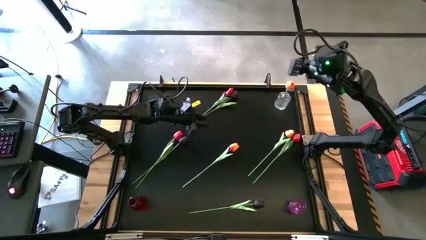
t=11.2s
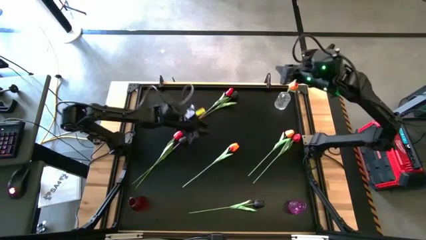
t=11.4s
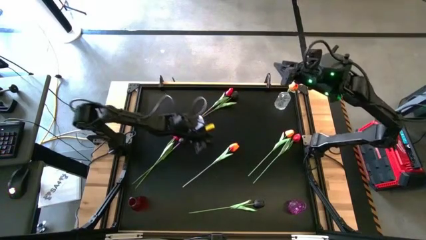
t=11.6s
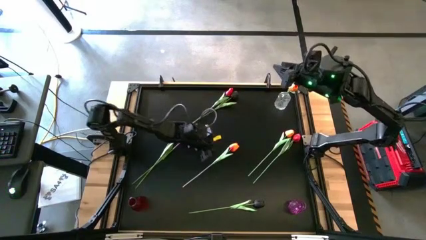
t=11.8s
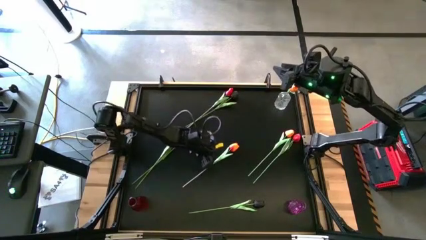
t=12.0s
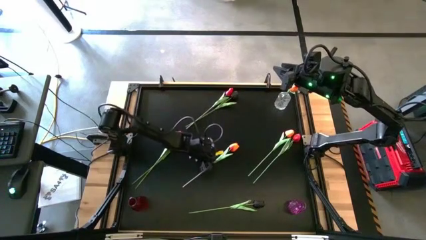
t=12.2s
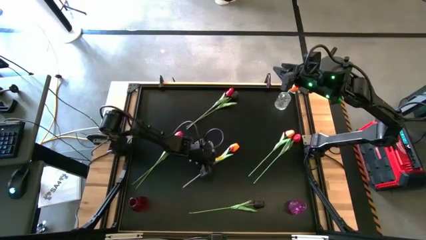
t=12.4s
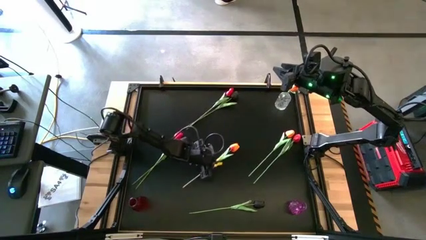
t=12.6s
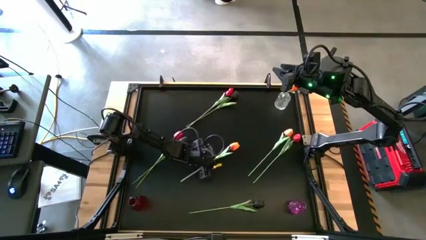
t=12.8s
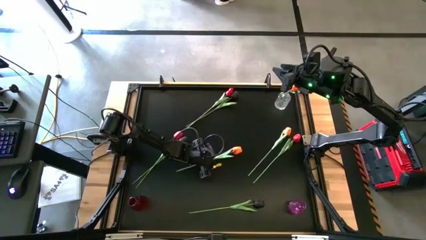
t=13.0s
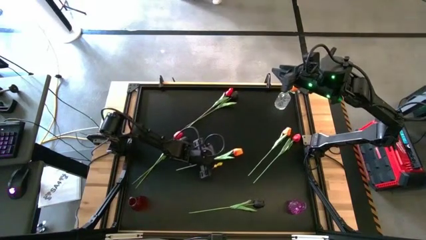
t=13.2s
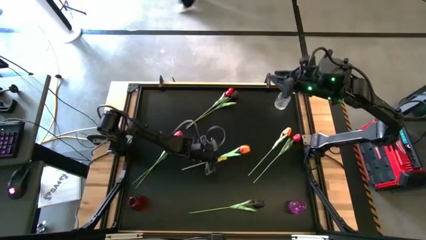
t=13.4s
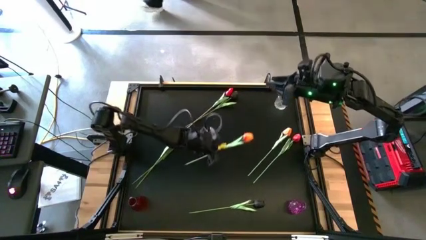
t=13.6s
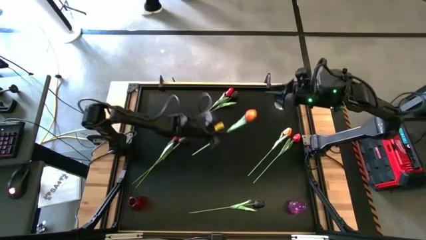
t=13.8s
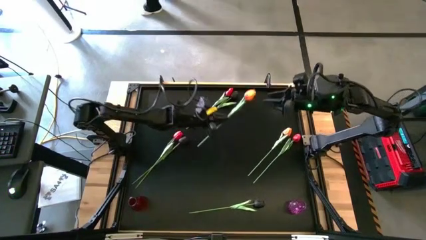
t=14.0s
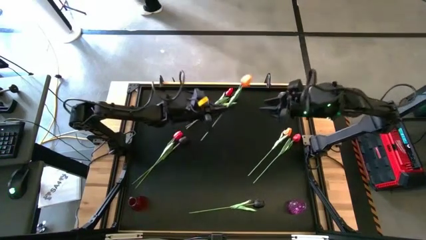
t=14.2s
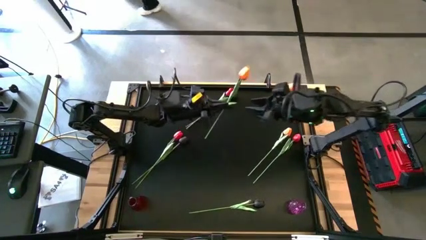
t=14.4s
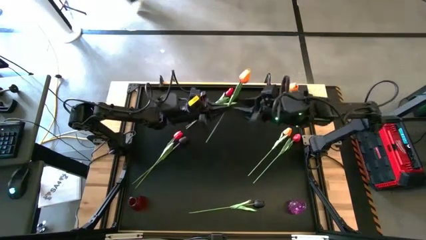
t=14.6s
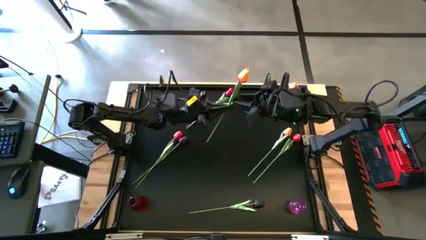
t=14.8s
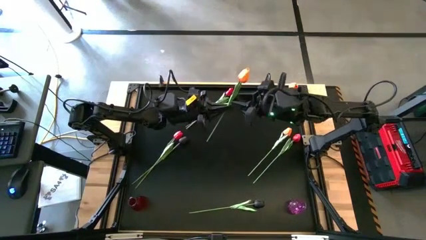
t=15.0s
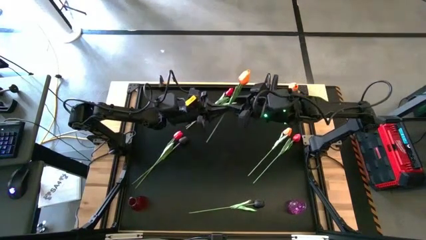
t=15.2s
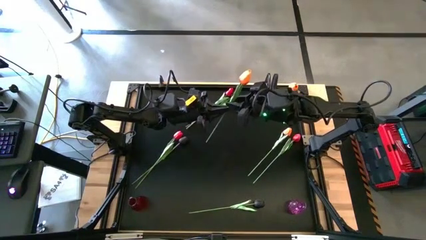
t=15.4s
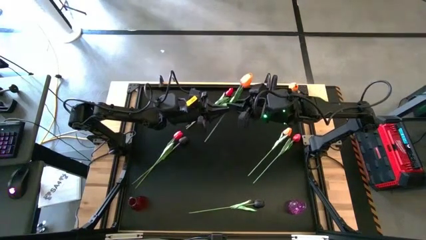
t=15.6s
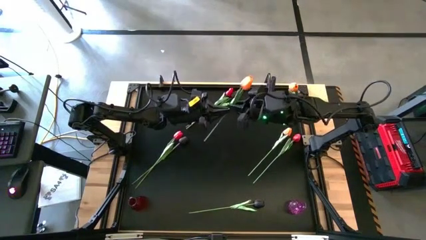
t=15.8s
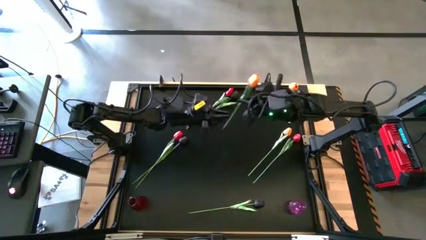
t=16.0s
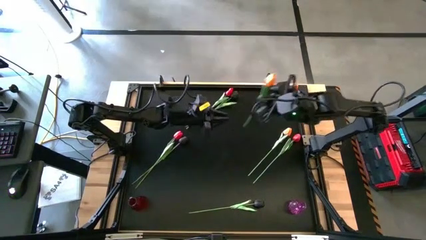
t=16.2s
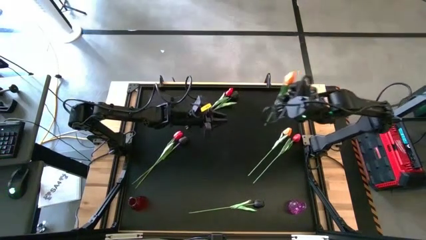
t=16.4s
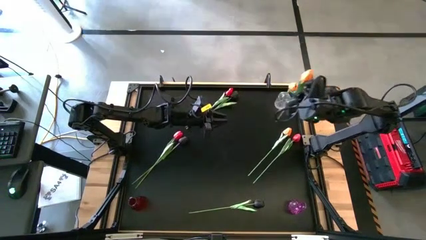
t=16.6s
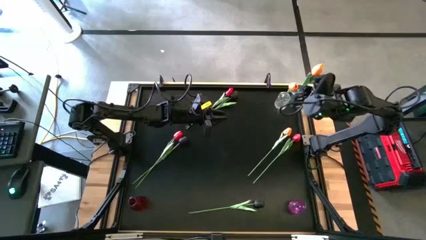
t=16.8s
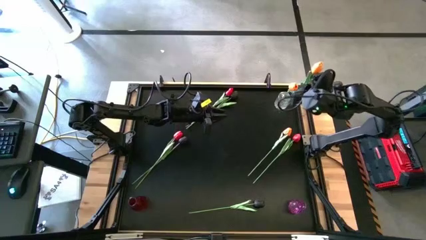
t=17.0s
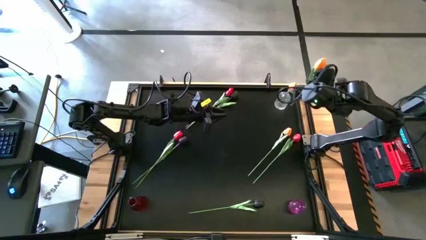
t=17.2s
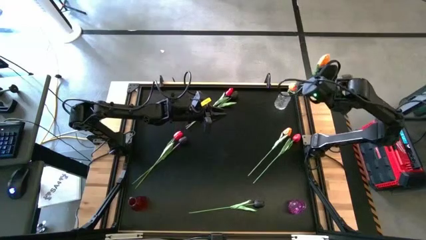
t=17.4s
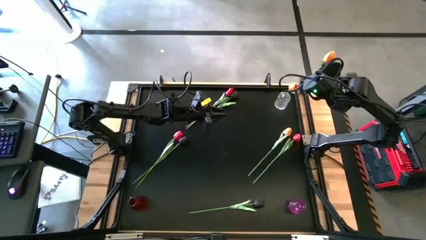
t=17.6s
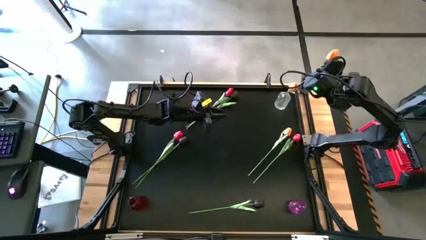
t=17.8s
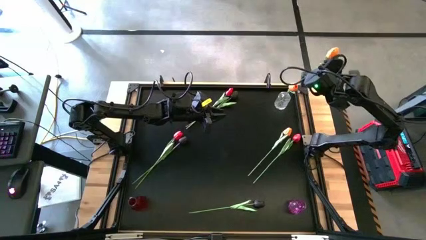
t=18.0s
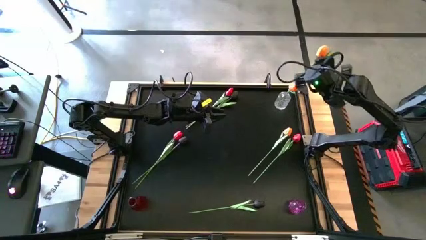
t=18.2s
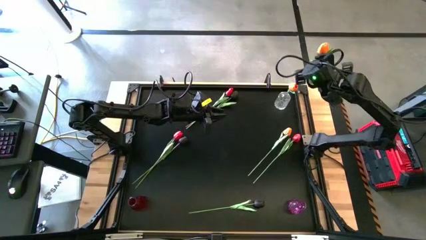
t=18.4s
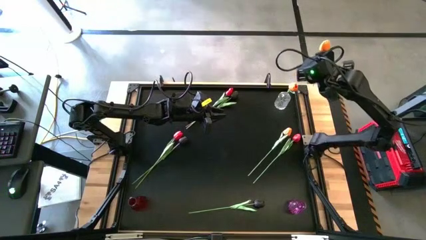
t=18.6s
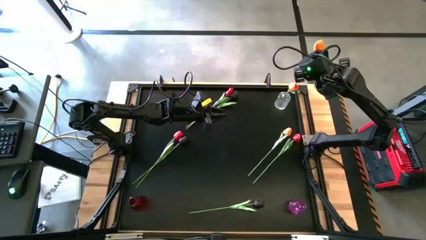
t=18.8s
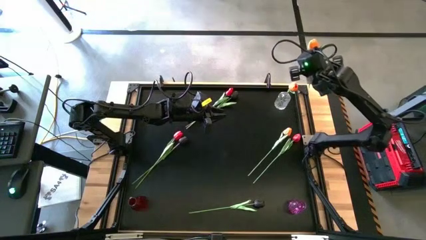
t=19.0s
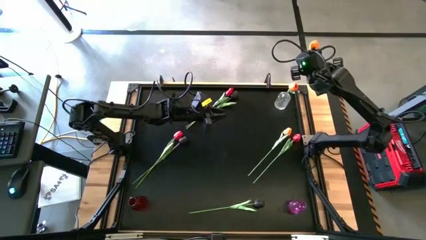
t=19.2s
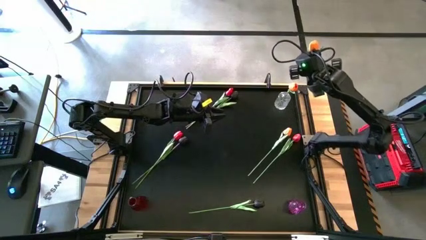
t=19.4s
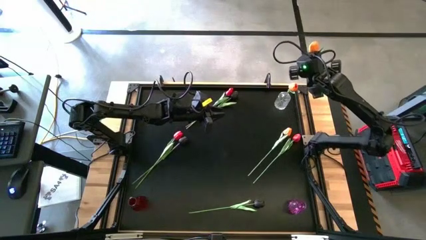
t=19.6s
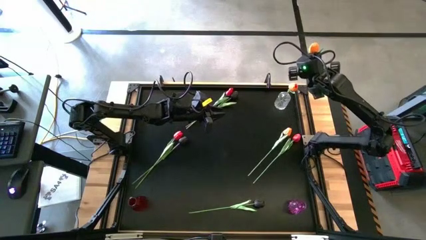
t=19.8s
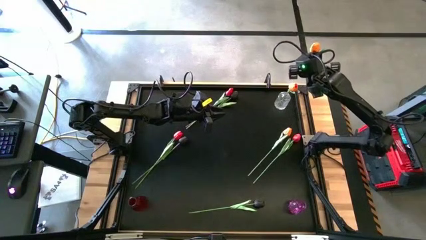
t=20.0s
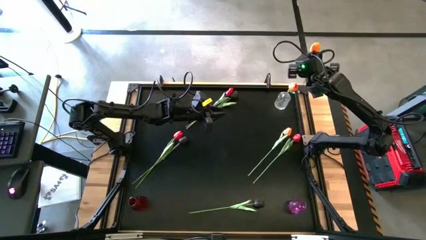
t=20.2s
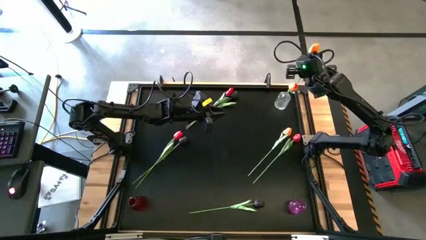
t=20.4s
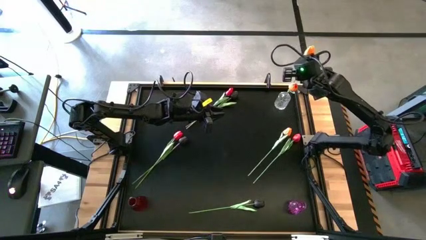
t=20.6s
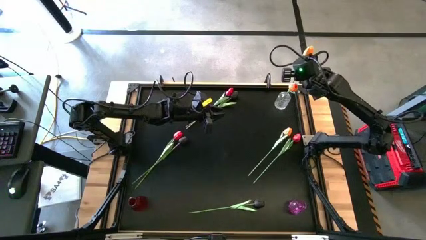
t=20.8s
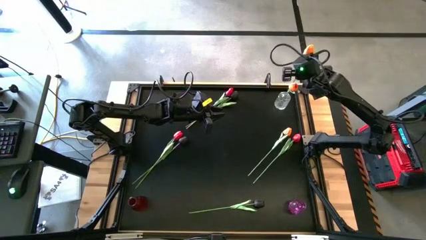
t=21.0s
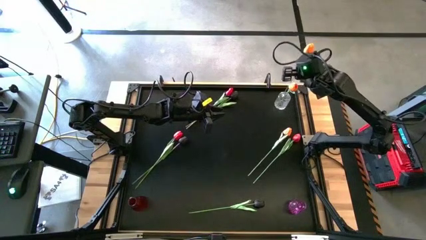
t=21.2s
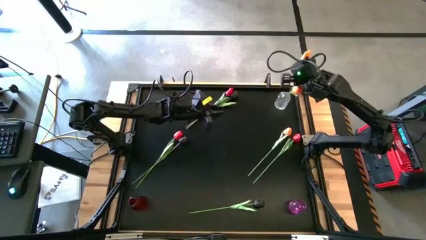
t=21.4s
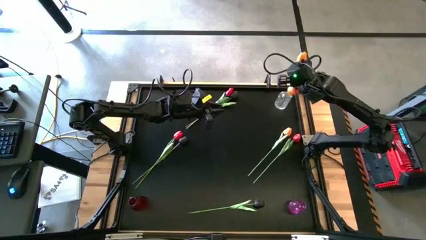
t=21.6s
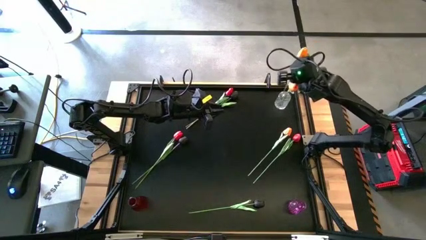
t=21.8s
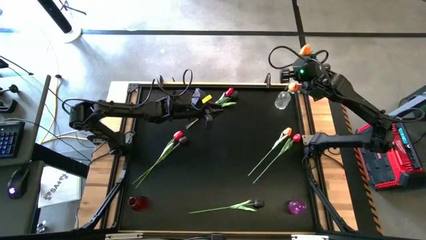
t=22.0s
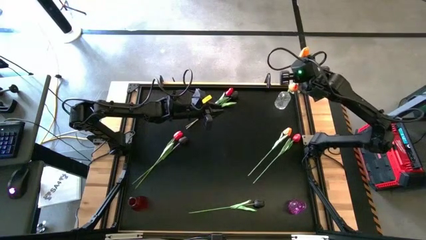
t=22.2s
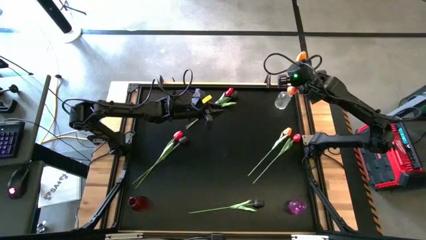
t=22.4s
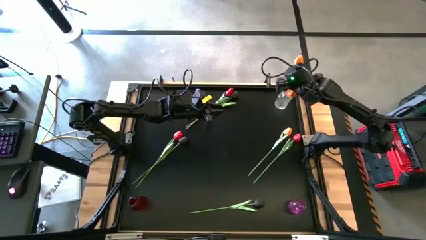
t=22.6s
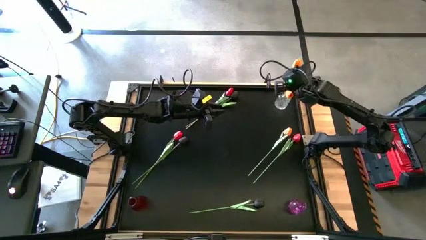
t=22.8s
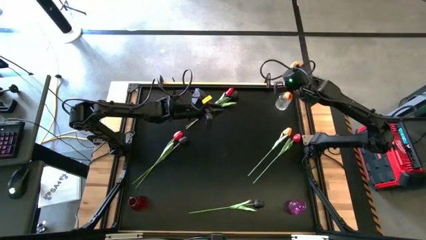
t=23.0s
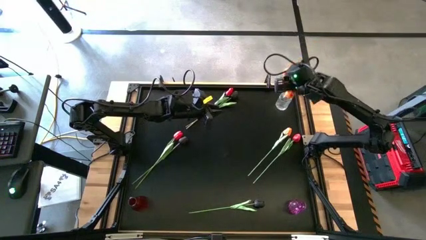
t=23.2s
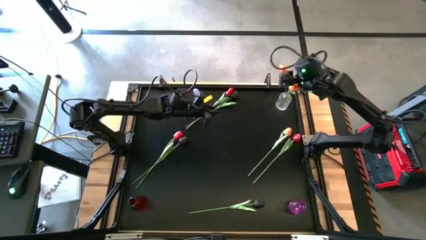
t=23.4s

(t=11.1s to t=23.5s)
Task: Sort flowers into vase by color
Put the left orange tulip into the transparent flower vase
